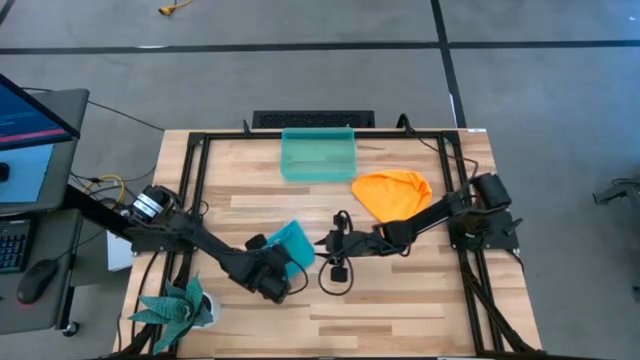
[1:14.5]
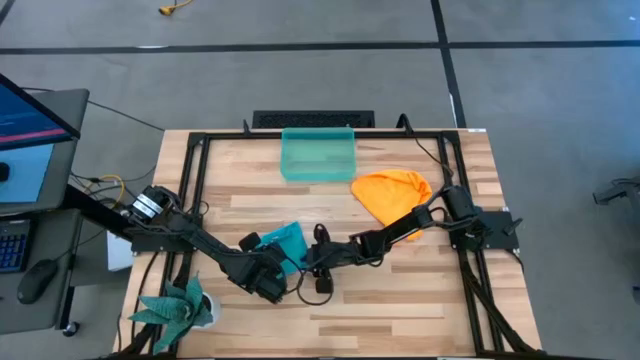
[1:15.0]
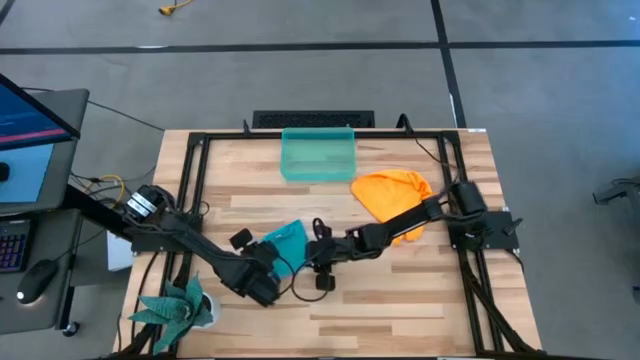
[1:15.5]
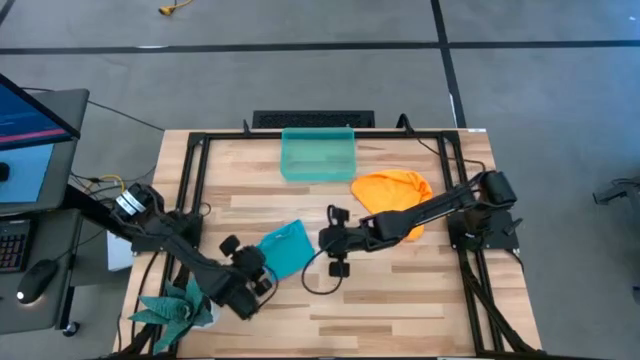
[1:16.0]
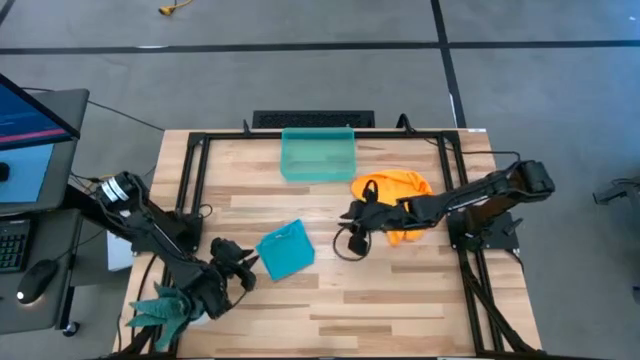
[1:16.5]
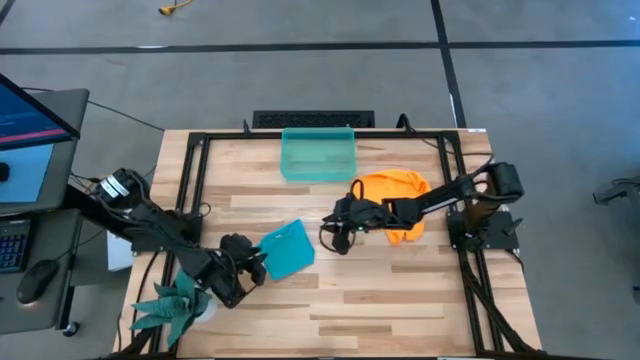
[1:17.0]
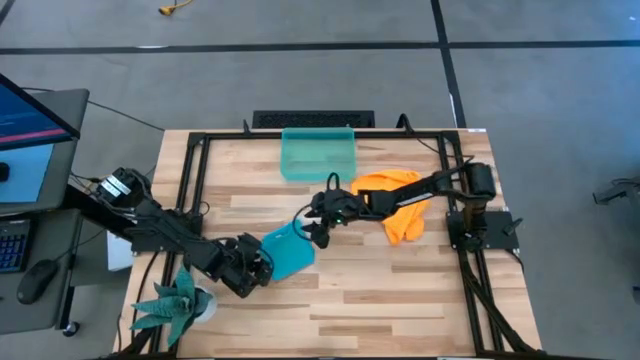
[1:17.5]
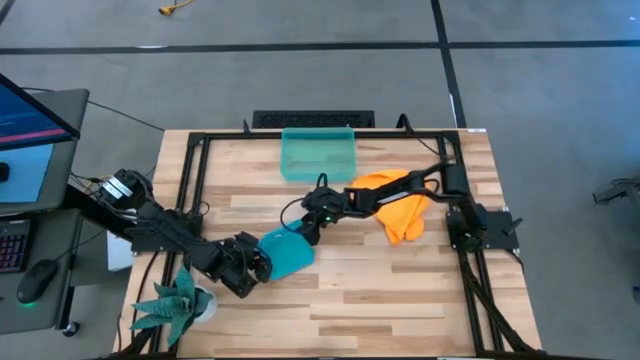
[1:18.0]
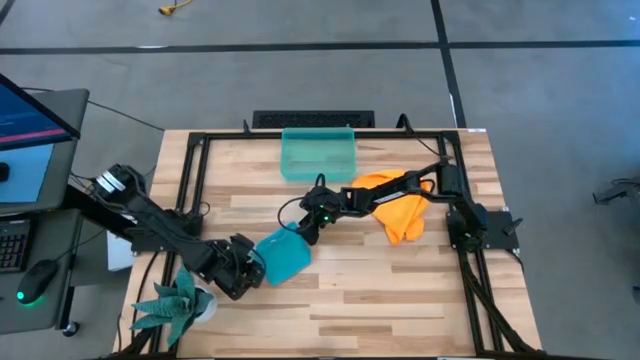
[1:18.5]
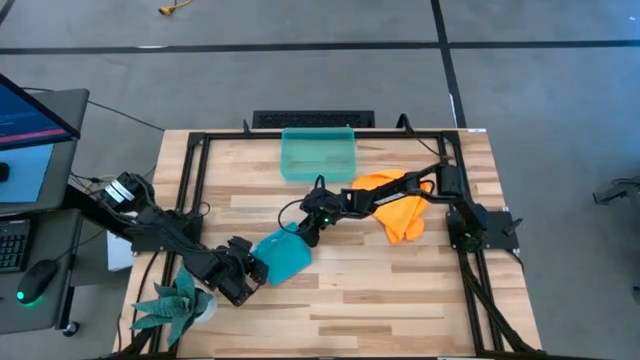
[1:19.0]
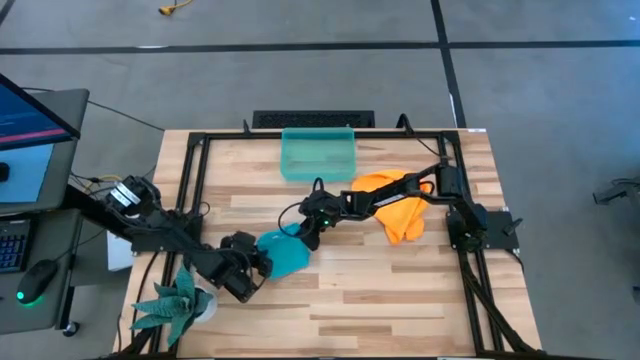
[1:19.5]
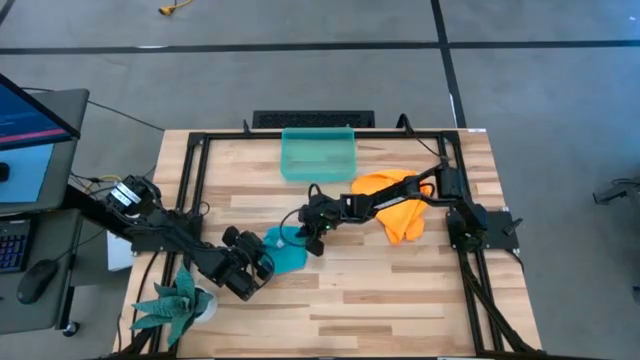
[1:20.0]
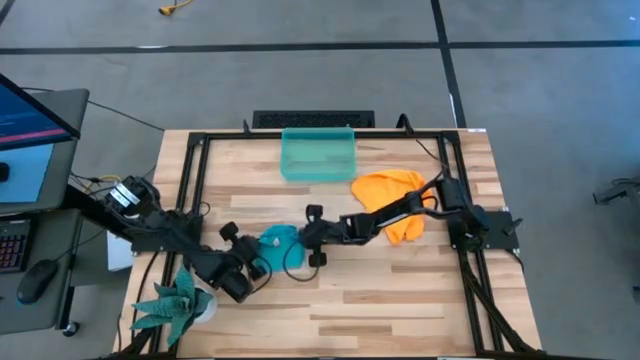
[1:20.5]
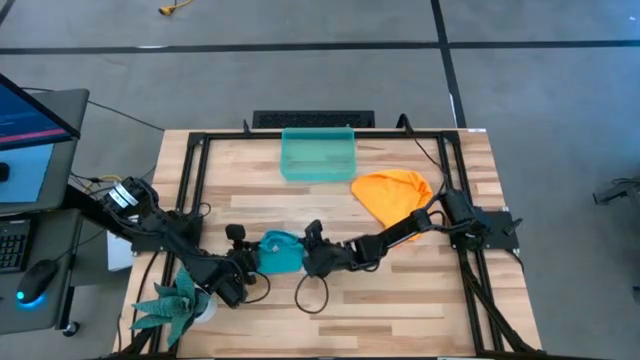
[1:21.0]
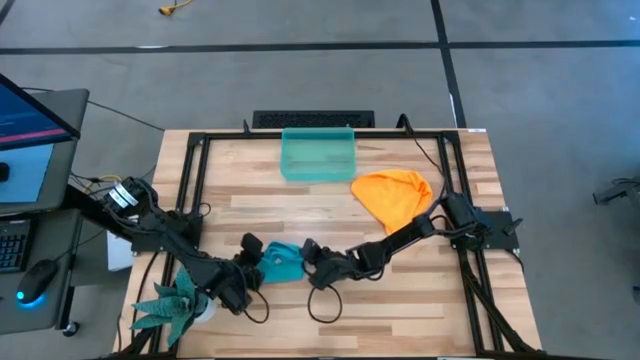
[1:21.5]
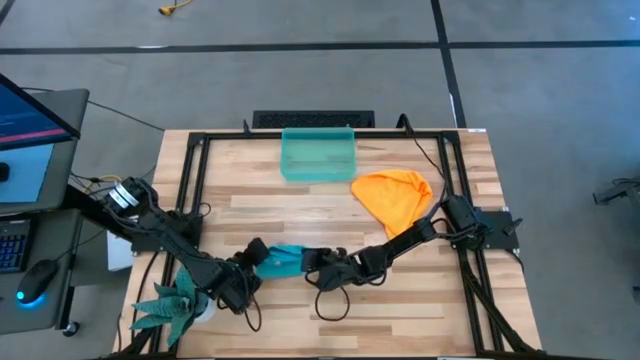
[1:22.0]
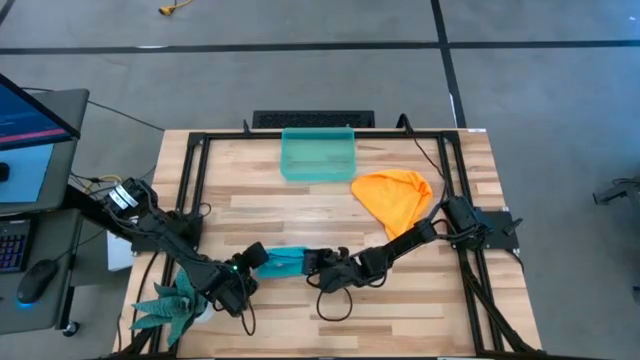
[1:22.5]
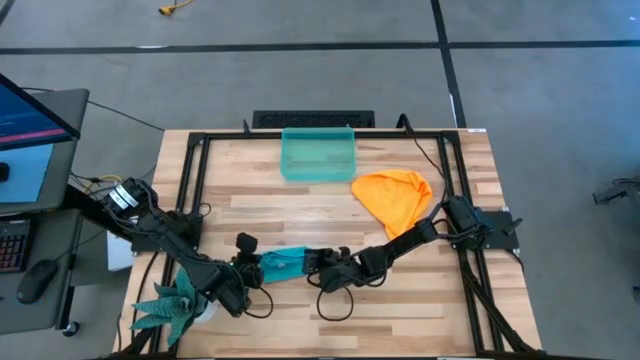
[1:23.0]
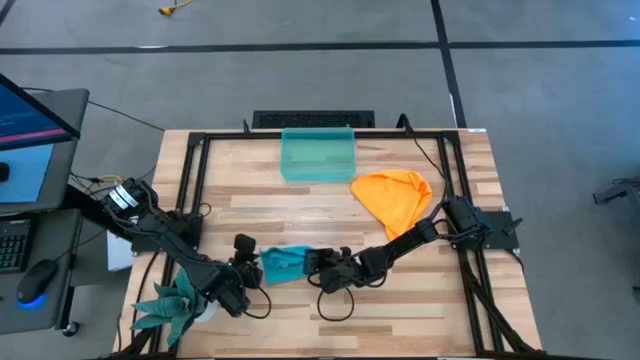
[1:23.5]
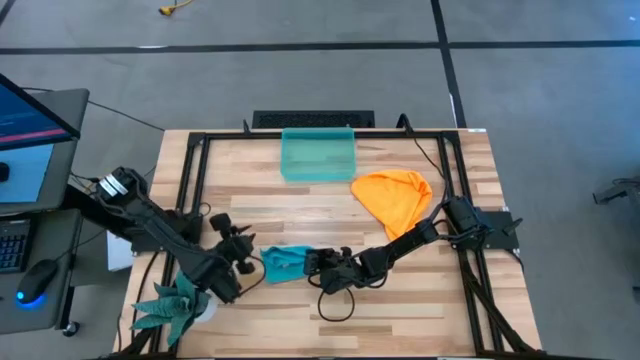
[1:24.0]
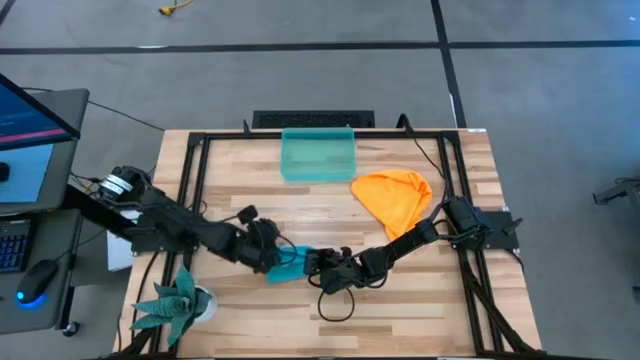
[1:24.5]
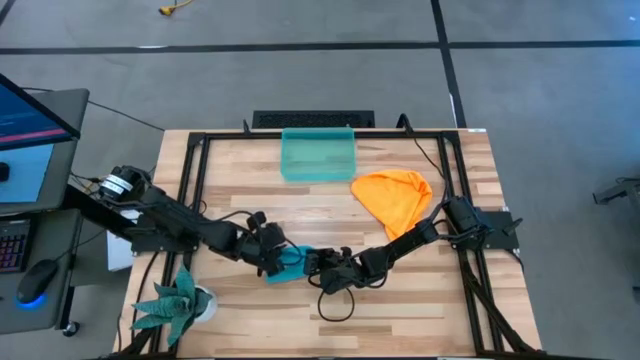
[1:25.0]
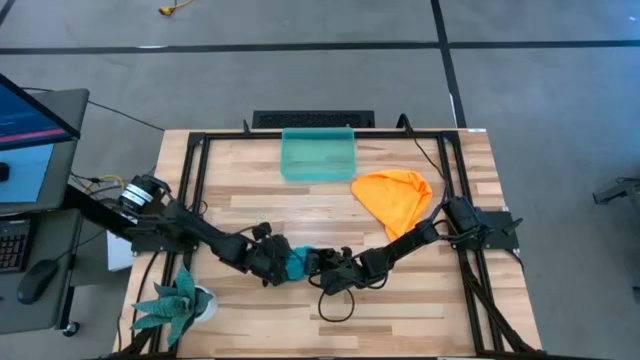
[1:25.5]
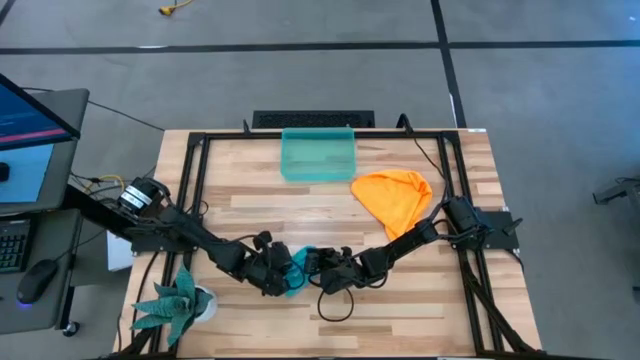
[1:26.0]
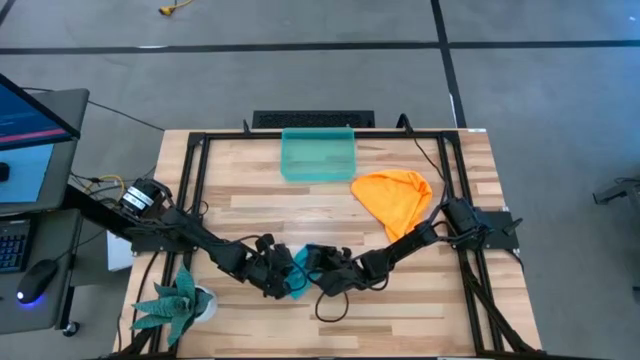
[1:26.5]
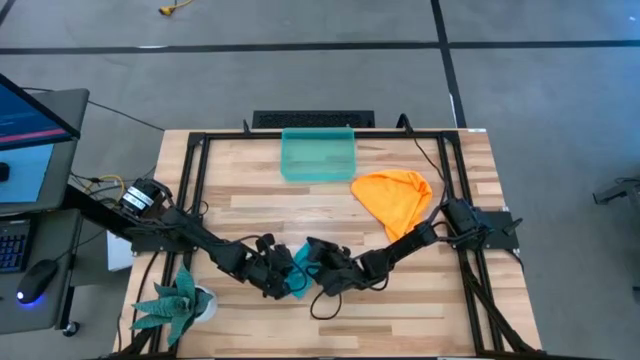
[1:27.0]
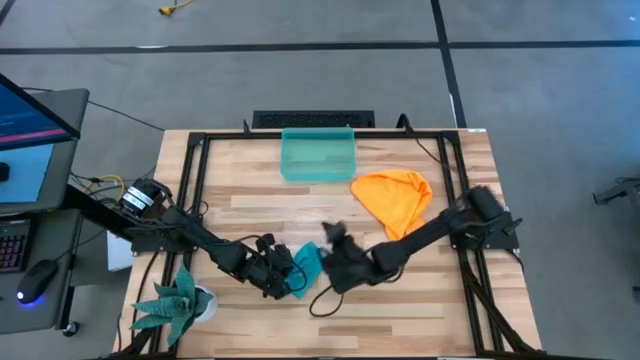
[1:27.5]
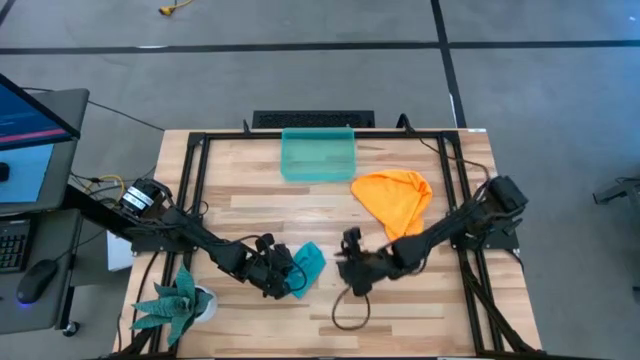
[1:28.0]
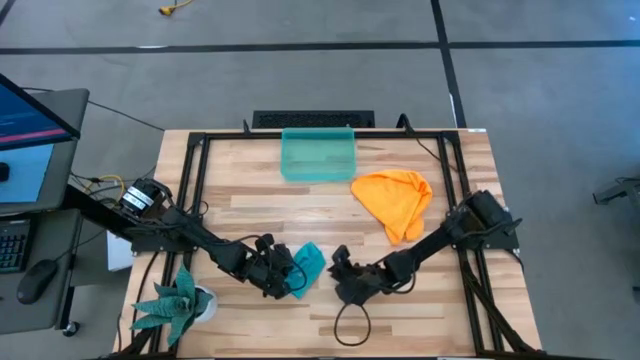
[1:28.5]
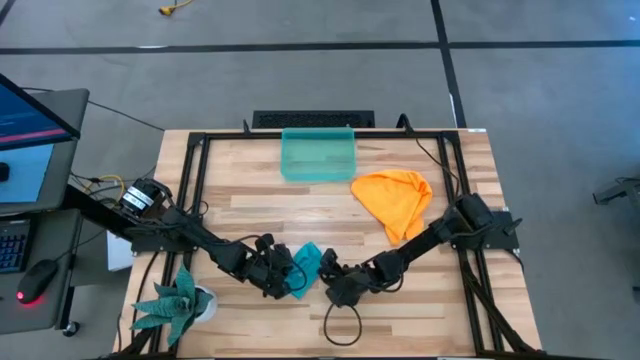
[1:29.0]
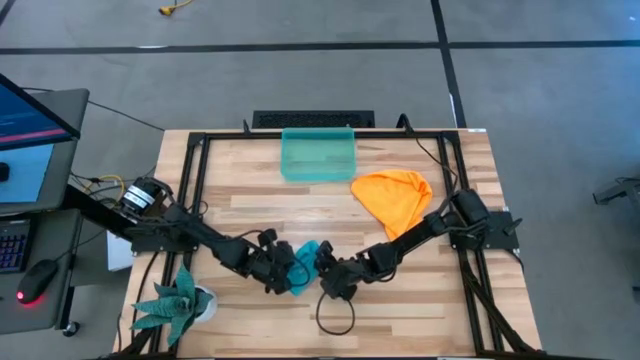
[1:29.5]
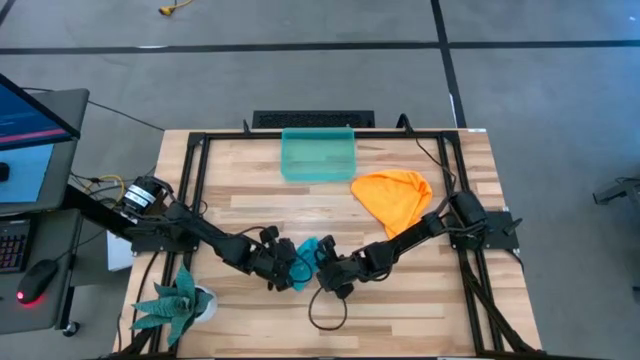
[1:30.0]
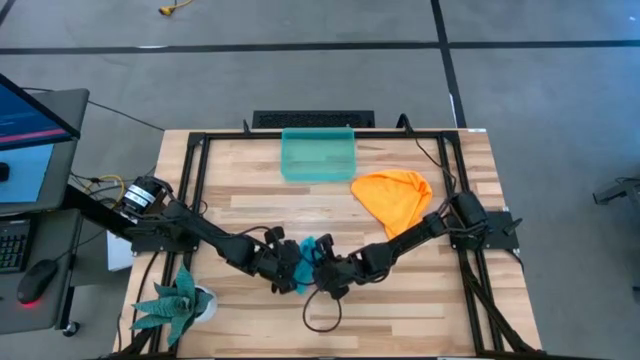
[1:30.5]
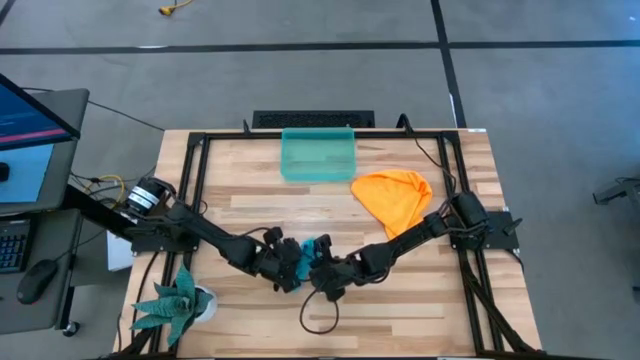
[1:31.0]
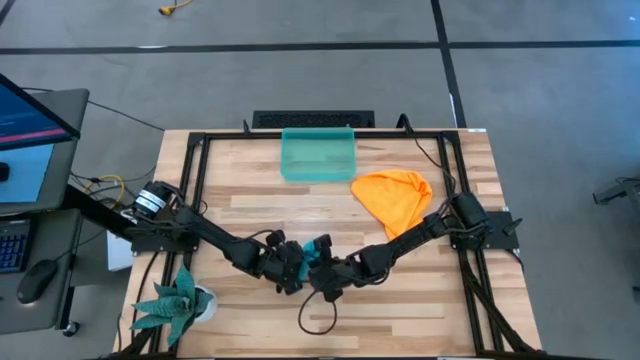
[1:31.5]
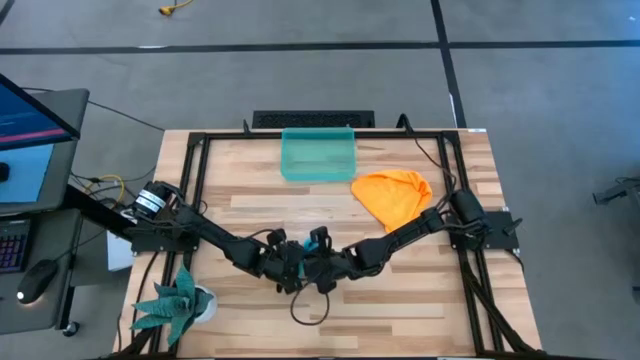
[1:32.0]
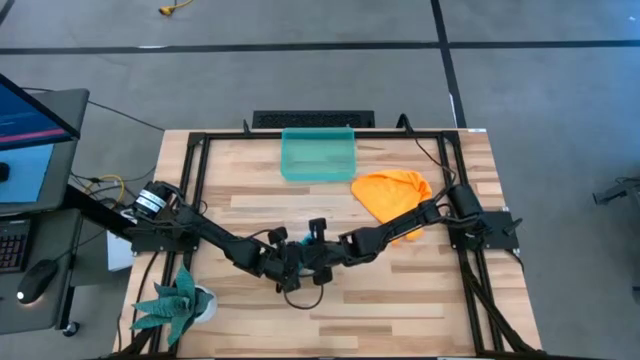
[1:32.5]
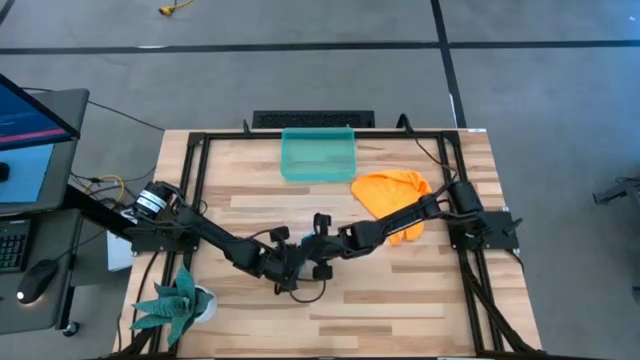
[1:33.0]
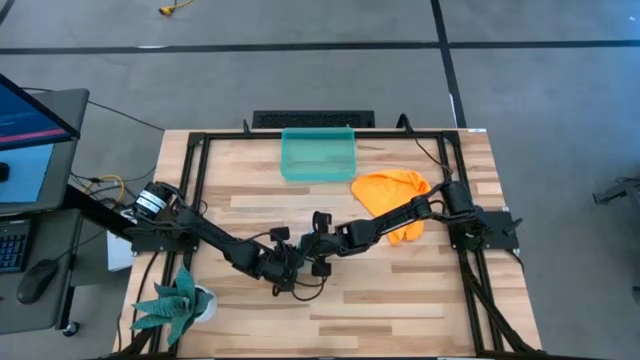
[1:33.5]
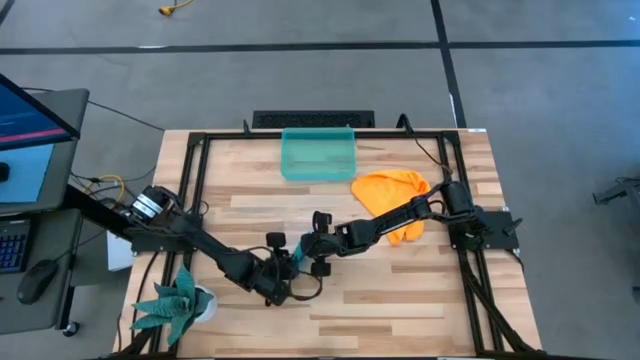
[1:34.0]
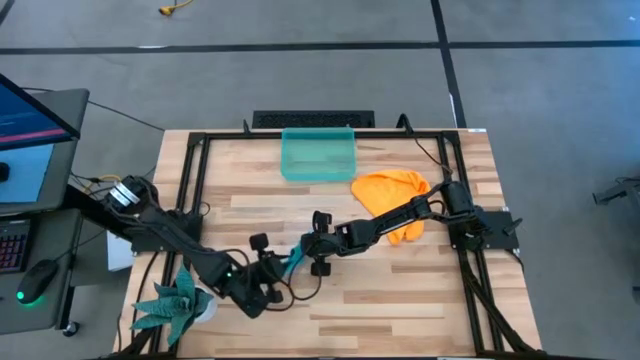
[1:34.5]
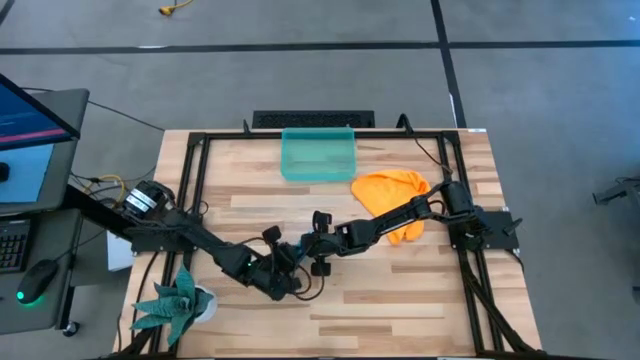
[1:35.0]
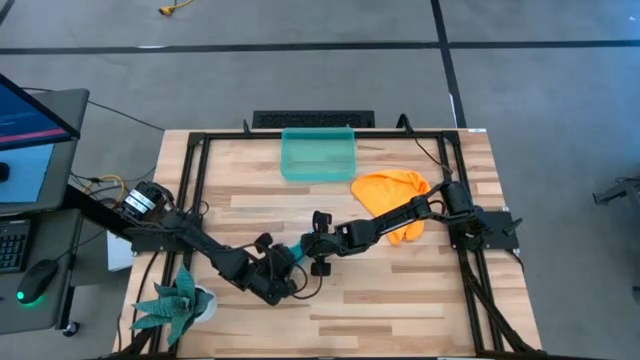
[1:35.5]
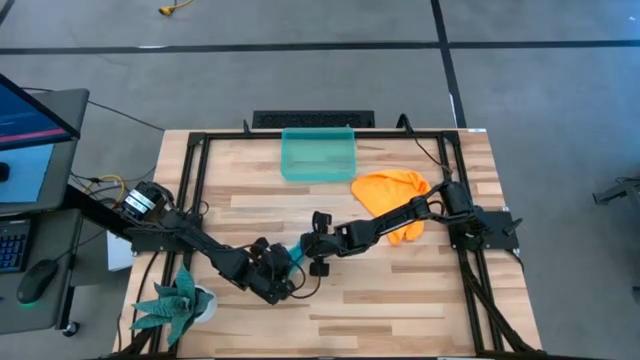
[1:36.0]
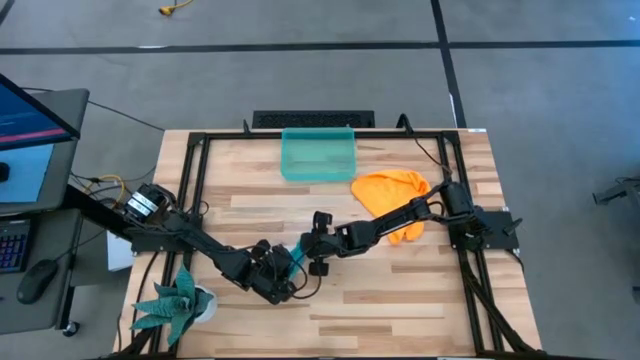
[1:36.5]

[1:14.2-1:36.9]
Task: Roll microfiber towels into tight, uniform cylinder then place into a basket
Fold the blue microfiber cloth
